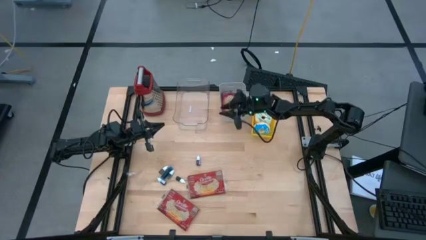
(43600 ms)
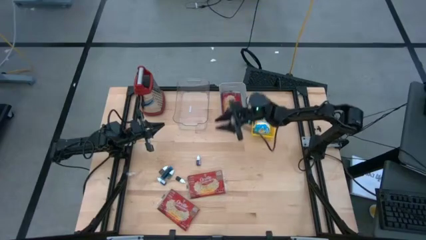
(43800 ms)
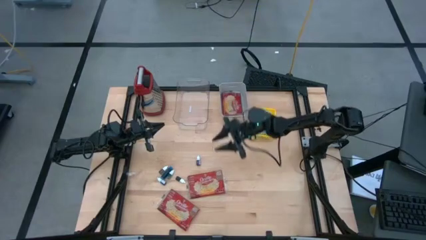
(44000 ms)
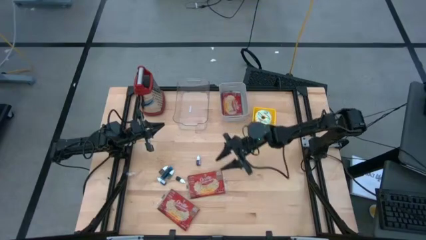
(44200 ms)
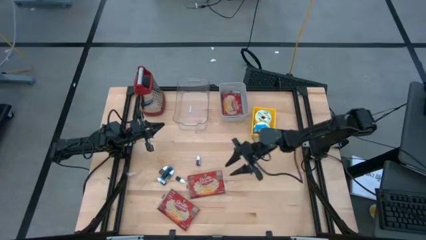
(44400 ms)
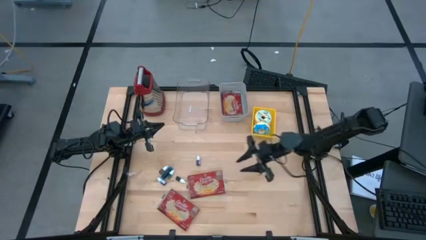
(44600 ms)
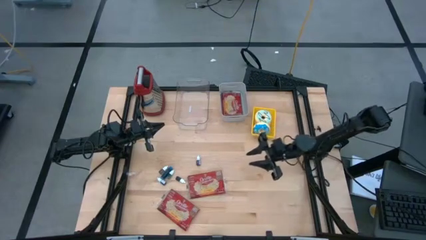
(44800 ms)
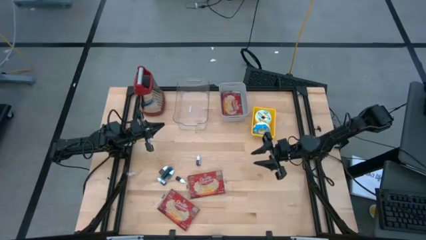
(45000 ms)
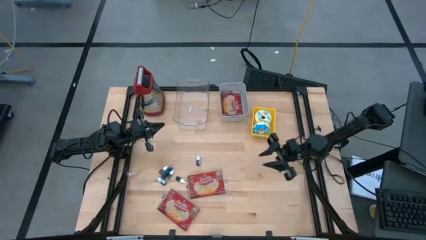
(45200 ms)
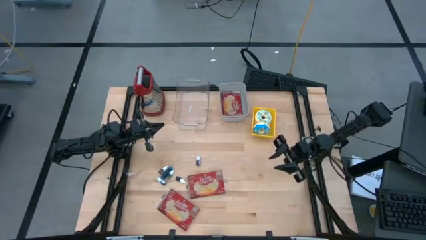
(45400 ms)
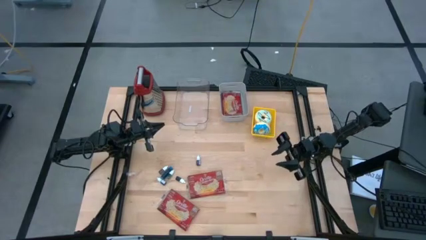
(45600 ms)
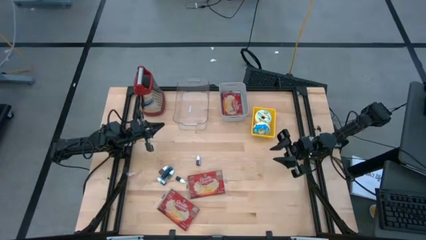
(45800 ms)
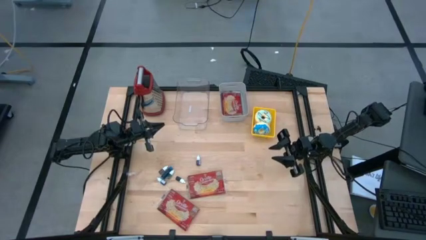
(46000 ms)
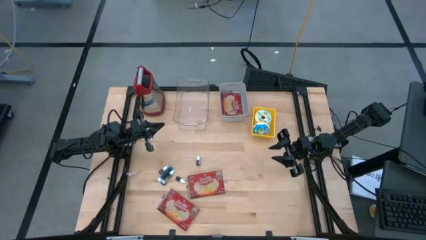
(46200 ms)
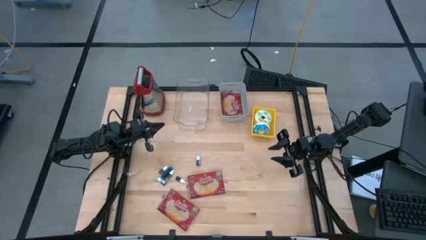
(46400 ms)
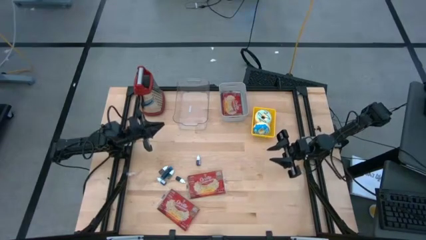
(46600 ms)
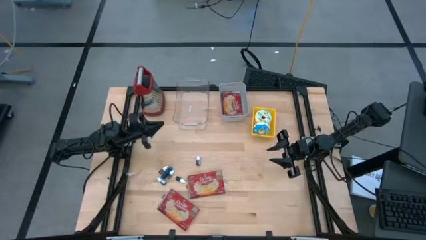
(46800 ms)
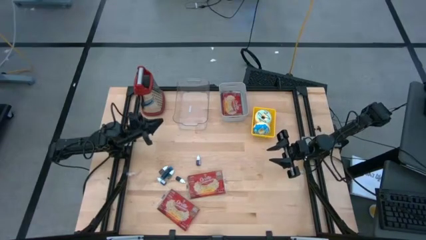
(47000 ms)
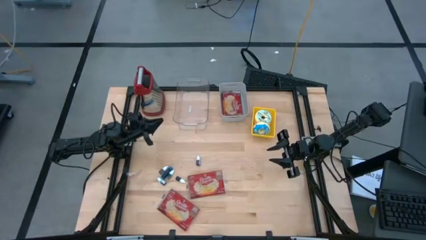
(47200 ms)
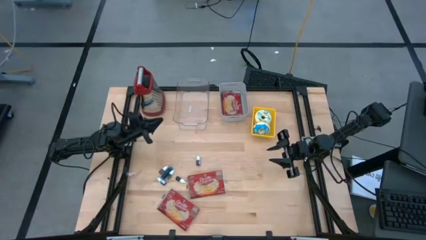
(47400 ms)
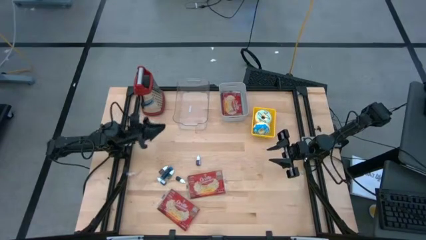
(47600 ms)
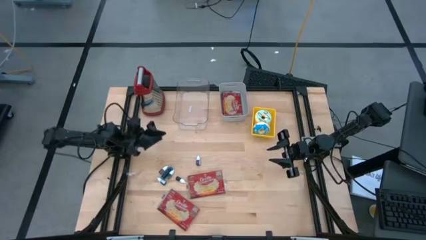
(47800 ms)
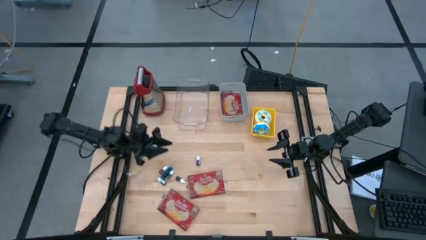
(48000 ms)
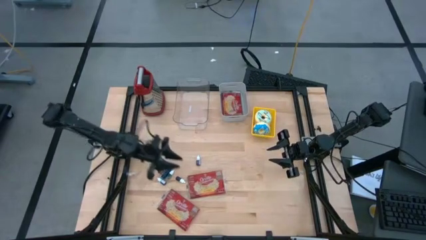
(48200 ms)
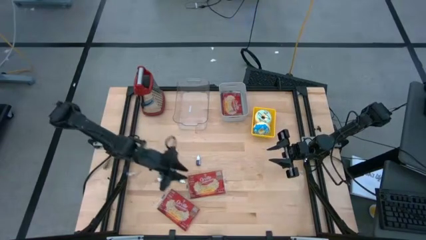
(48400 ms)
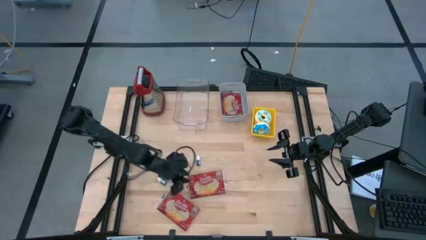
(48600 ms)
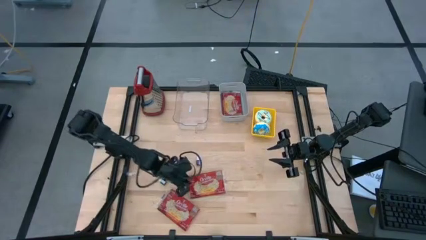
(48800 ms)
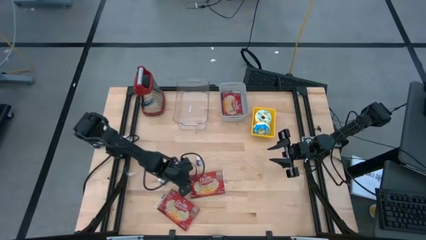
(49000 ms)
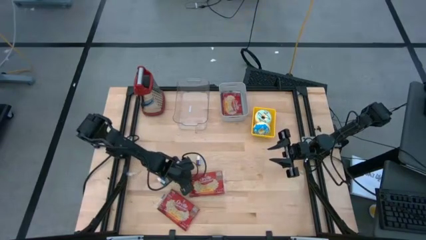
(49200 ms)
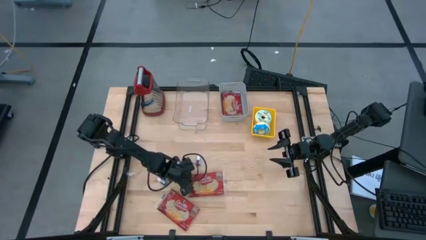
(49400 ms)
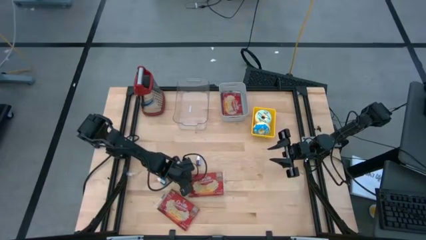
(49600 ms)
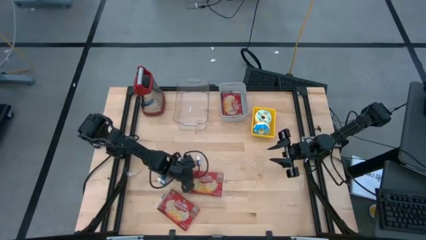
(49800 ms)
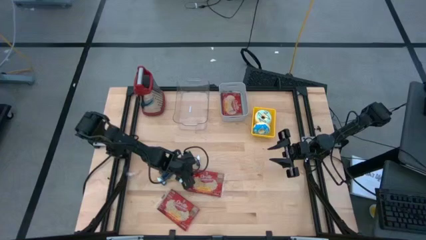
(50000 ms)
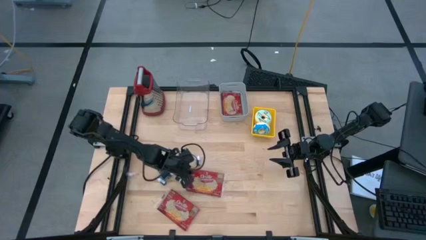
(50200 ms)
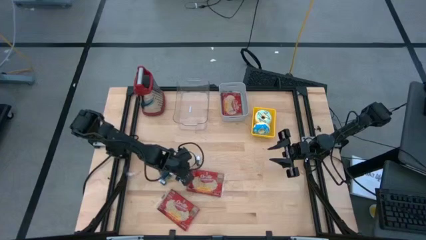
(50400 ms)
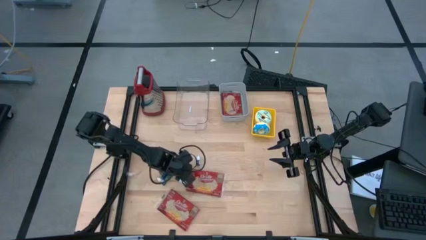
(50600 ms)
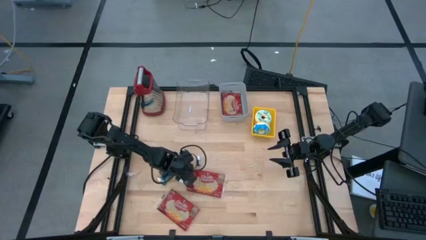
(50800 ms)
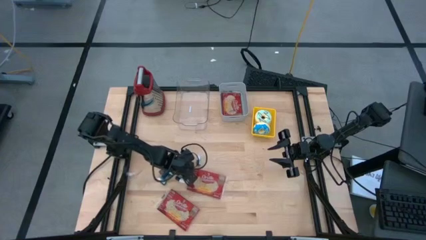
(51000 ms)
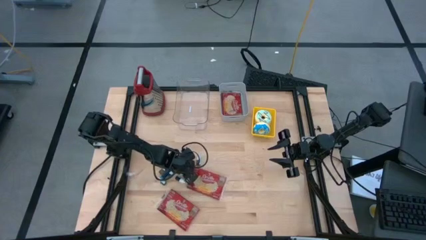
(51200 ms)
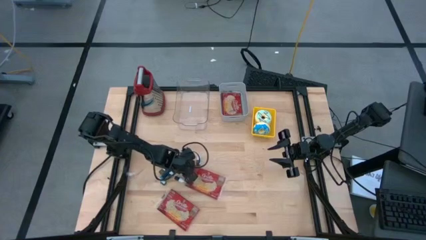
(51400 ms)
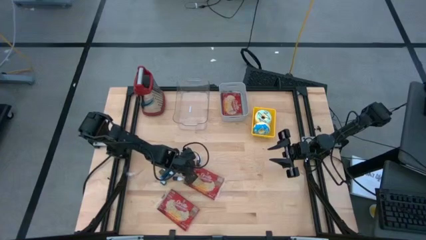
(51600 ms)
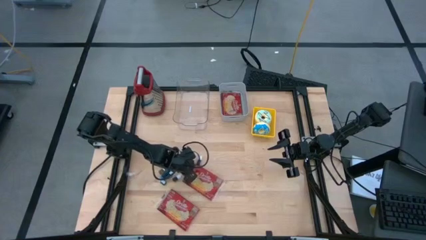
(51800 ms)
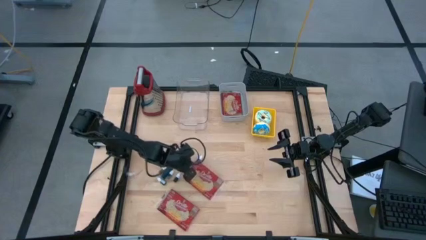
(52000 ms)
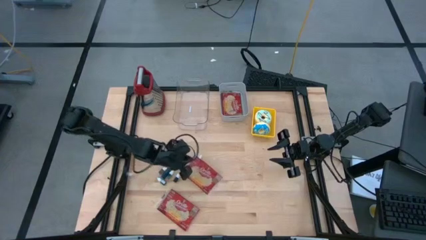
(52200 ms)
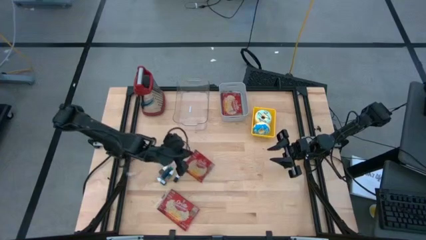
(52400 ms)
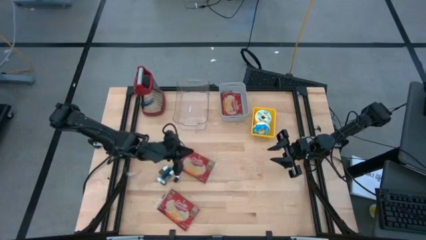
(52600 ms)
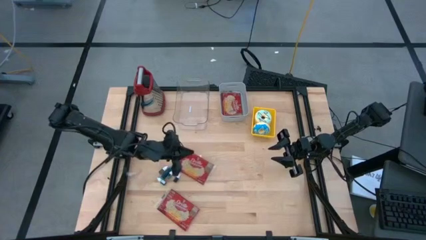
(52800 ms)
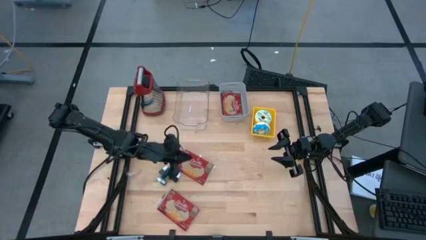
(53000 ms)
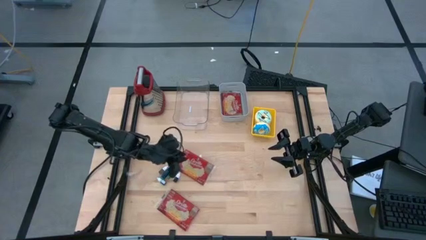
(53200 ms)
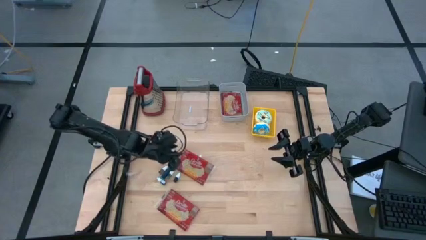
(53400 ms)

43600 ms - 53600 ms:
Task: Pick & Place Food Item
Put the top popcorn bag pack into the gray bin

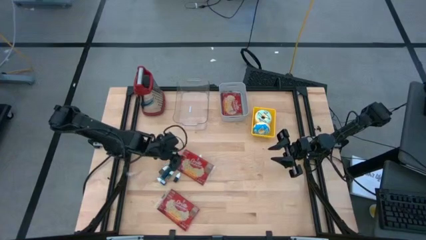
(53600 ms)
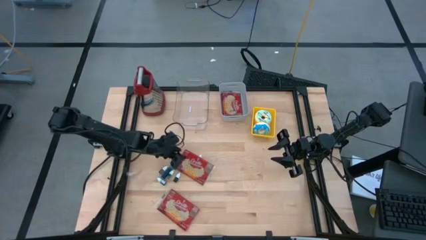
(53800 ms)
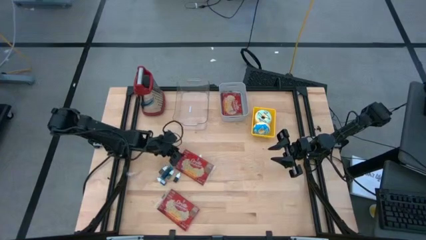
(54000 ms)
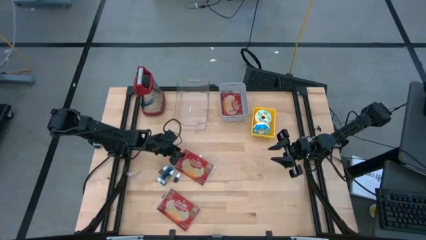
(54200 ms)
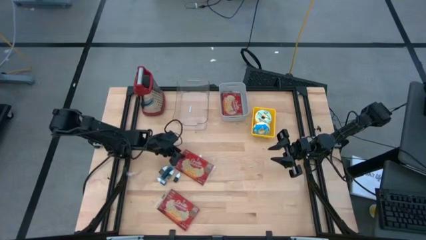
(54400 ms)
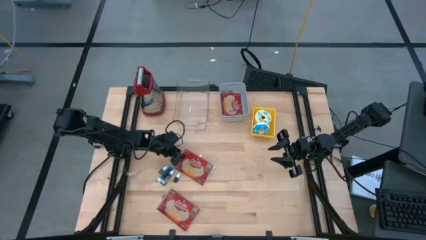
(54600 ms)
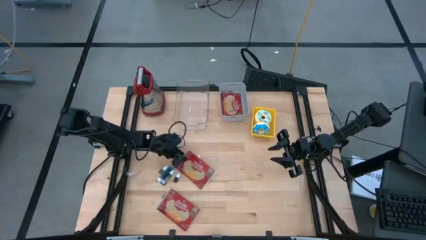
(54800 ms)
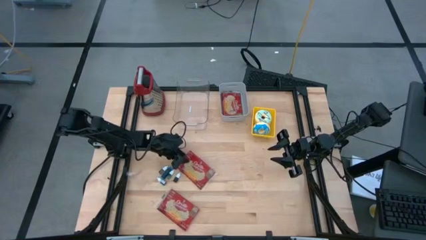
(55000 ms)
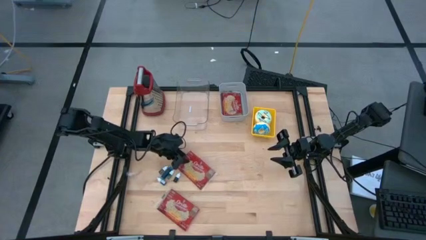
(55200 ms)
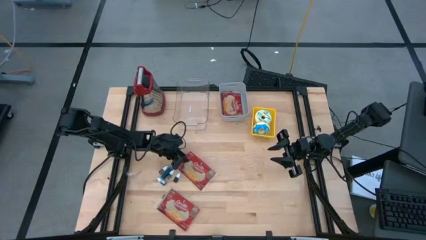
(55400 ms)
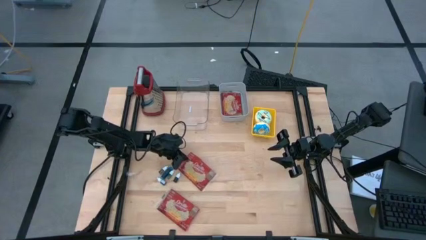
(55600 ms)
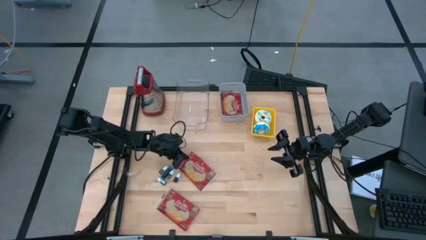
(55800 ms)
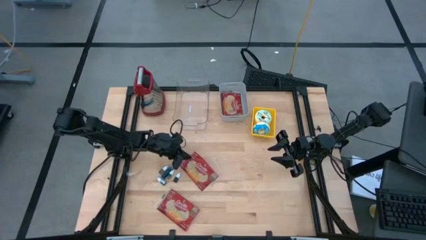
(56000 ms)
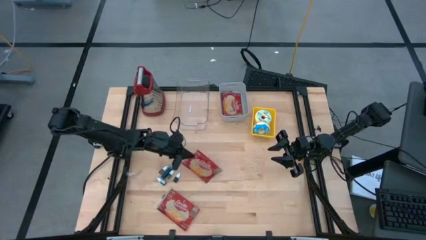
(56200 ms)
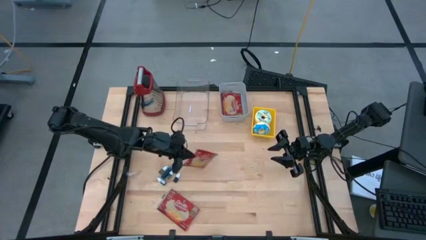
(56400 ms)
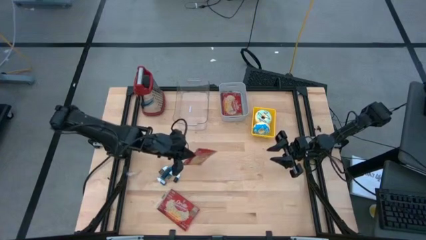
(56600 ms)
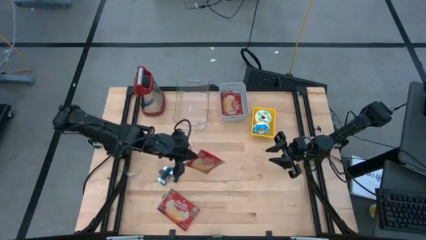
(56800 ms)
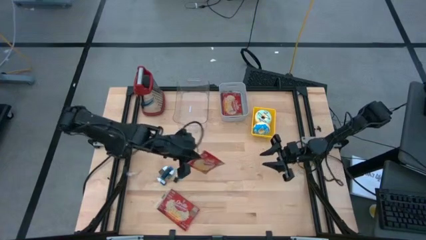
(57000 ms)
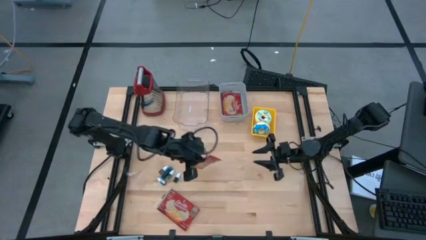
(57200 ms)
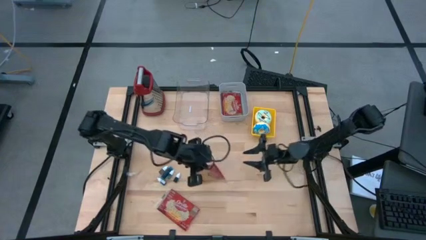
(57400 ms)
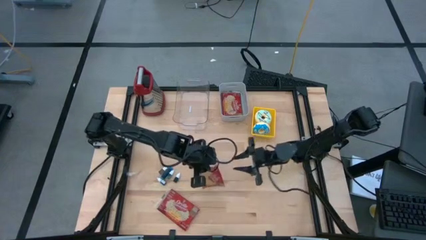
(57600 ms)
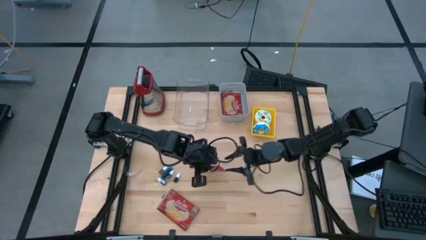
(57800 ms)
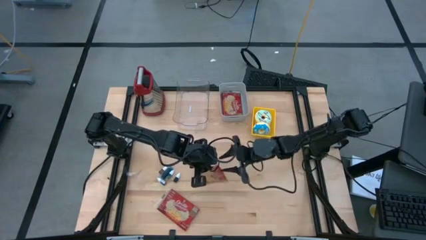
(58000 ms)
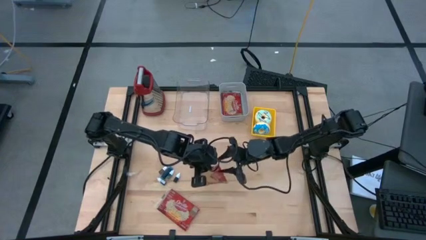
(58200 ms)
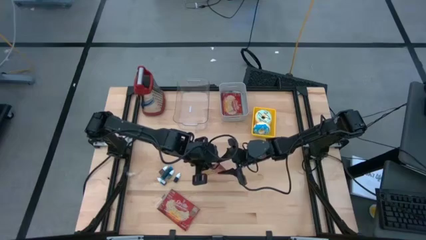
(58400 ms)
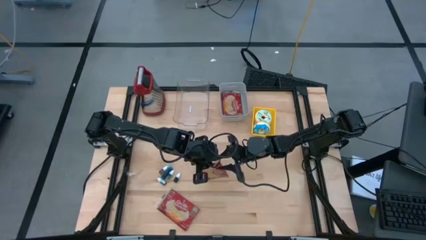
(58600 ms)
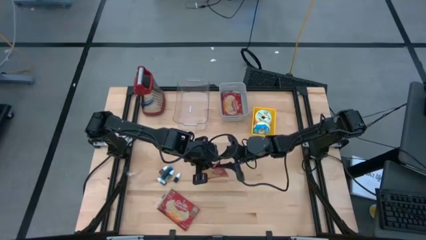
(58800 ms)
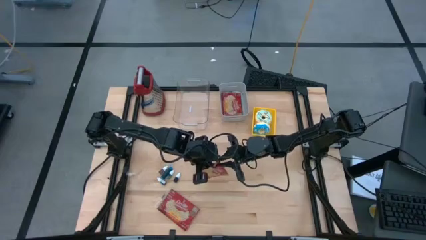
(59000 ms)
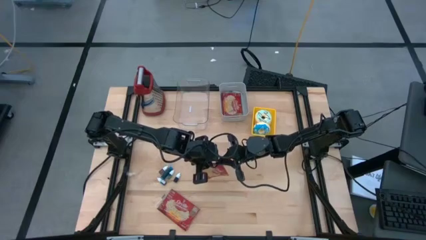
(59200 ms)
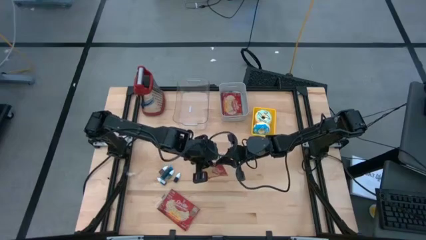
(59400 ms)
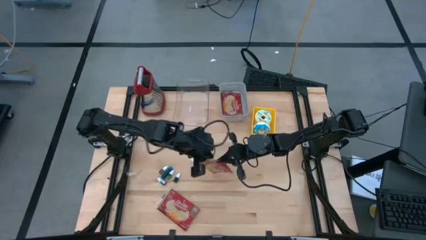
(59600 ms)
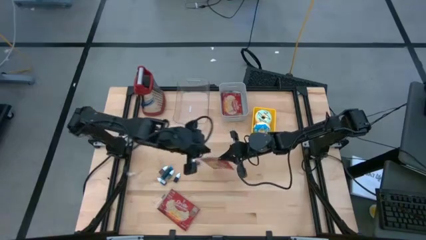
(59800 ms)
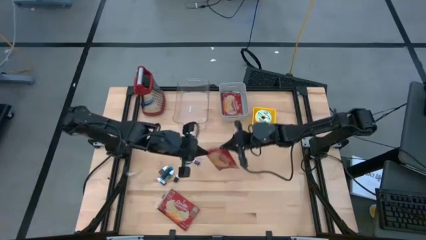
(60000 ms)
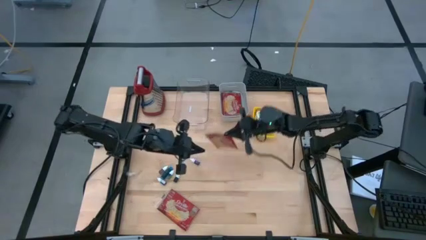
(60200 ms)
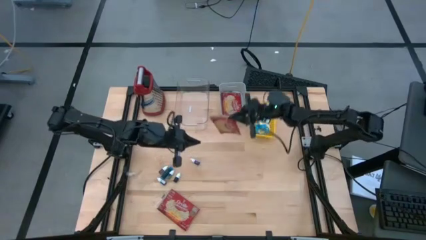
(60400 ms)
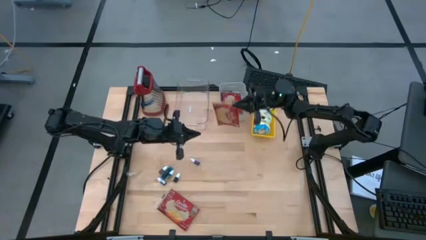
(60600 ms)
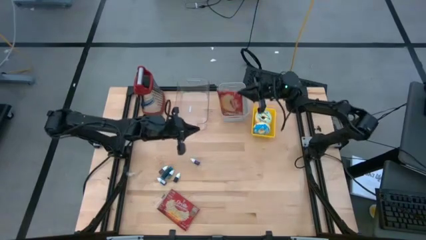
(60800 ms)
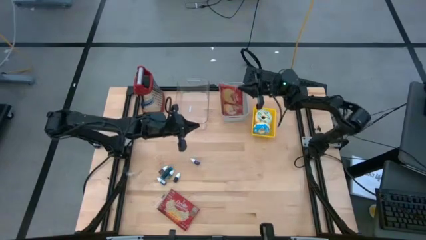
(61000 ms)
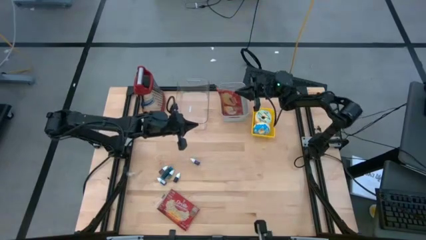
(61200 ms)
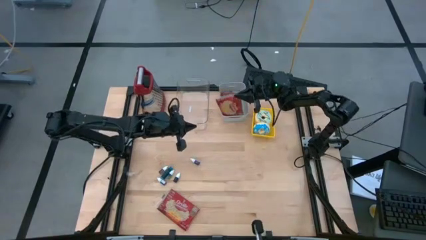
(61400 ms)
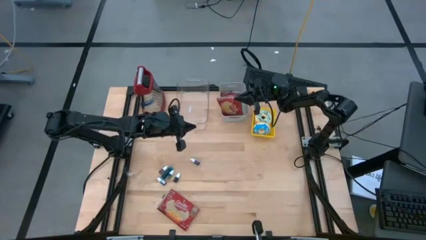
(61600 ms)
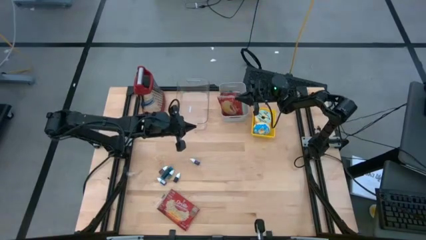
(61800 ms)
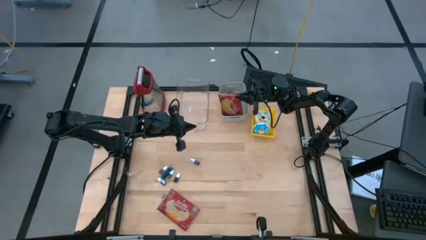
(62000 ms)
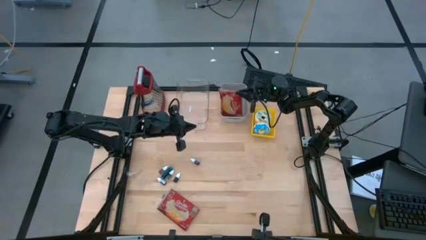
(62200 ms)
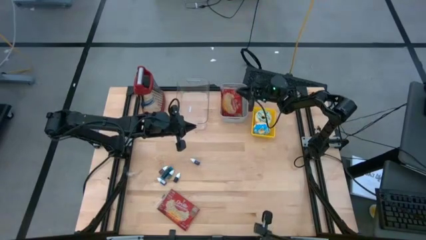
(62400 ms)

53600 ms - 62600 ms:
Put the top popcorn bag pack into the gray bin
